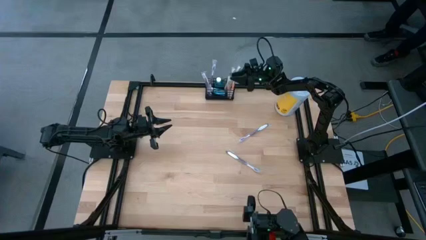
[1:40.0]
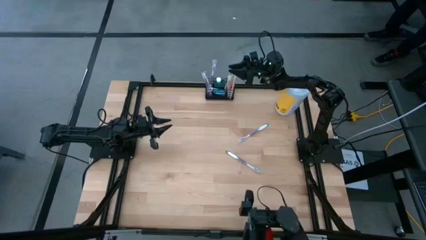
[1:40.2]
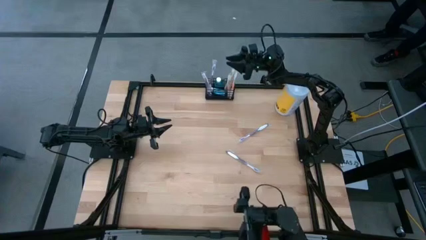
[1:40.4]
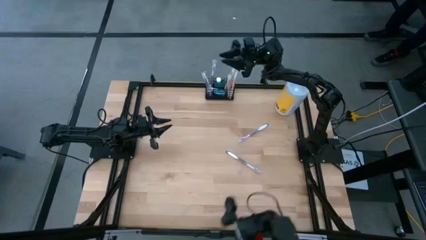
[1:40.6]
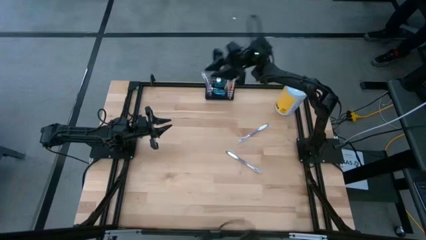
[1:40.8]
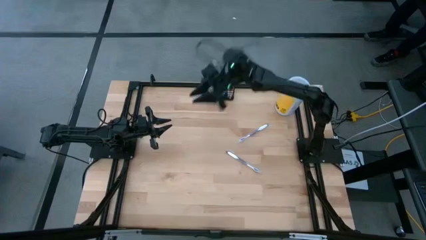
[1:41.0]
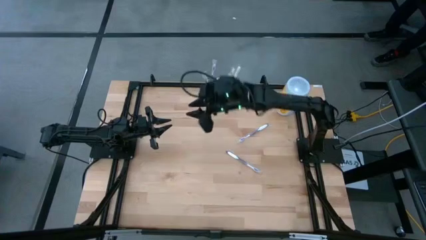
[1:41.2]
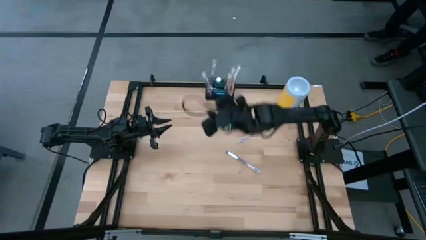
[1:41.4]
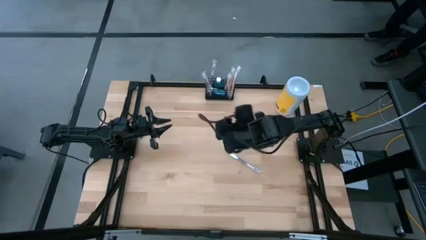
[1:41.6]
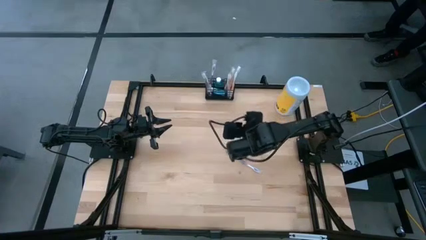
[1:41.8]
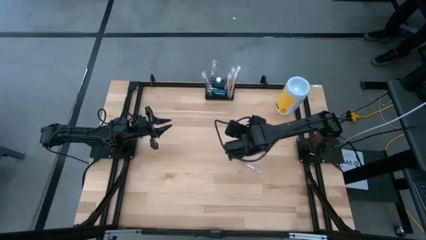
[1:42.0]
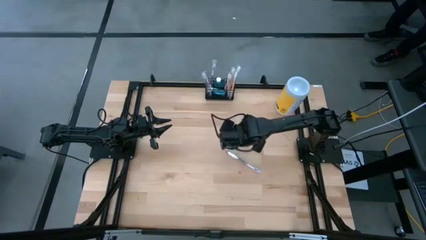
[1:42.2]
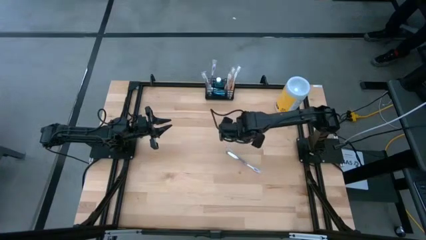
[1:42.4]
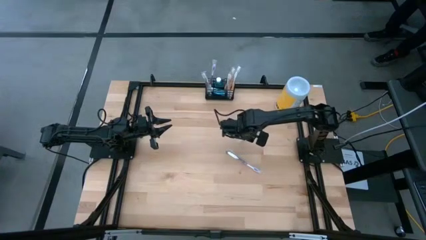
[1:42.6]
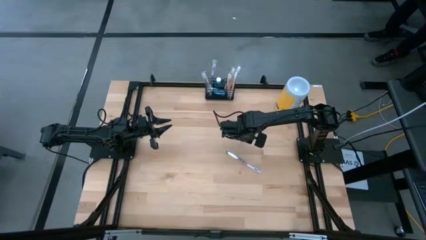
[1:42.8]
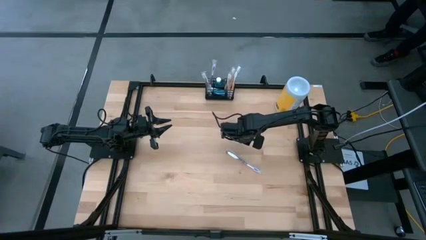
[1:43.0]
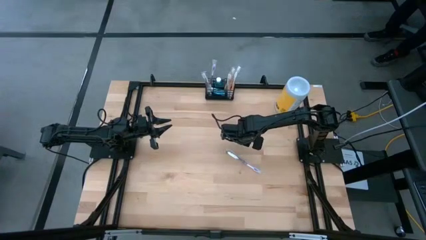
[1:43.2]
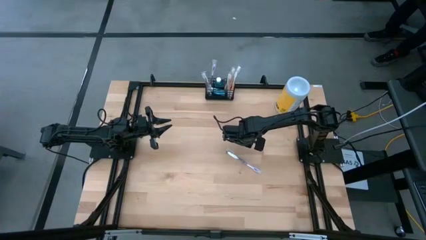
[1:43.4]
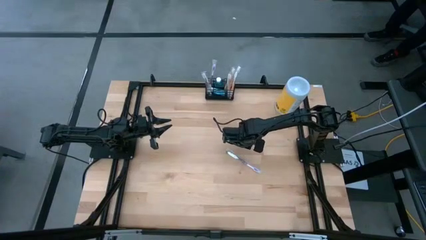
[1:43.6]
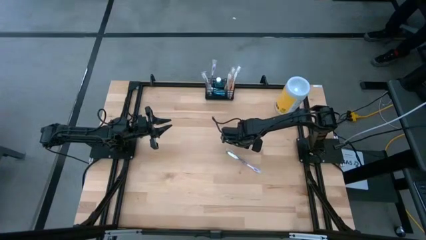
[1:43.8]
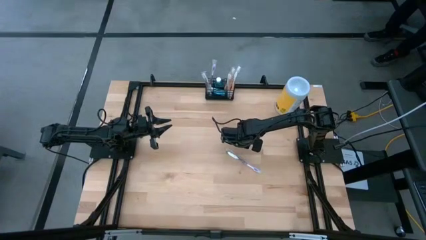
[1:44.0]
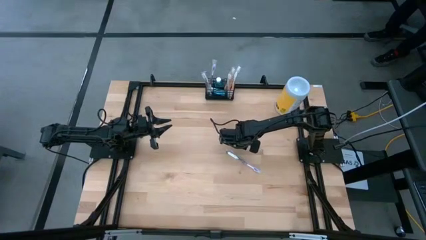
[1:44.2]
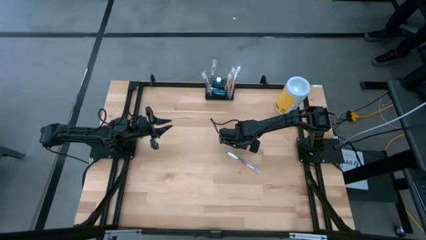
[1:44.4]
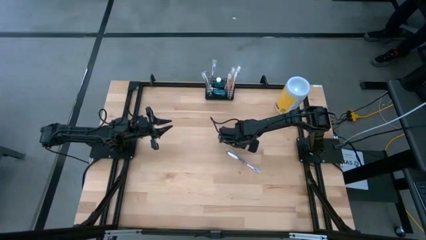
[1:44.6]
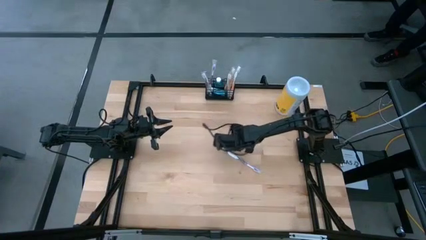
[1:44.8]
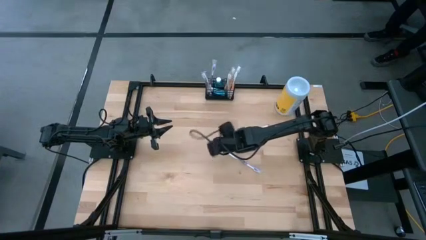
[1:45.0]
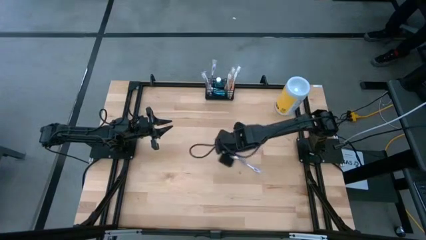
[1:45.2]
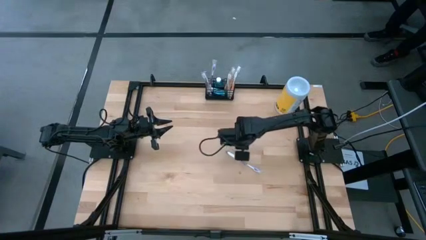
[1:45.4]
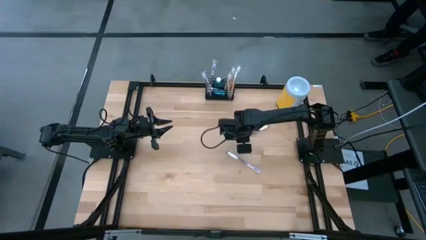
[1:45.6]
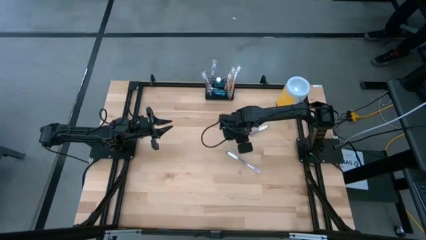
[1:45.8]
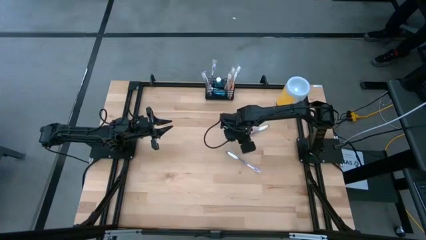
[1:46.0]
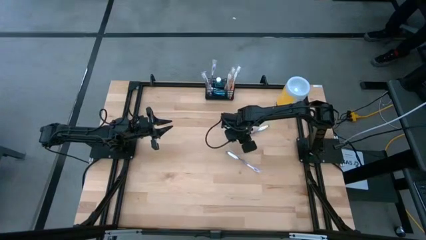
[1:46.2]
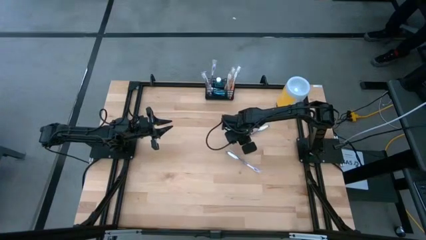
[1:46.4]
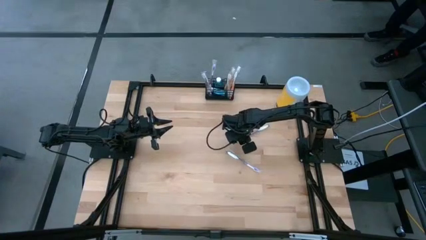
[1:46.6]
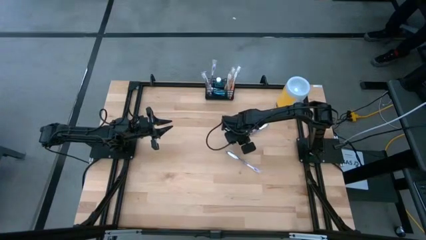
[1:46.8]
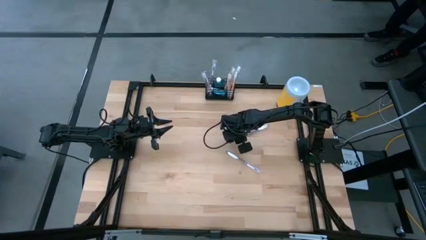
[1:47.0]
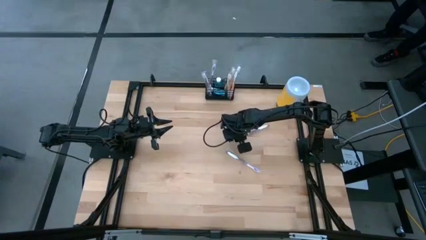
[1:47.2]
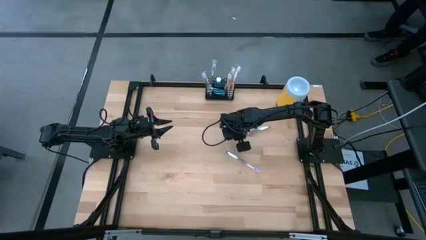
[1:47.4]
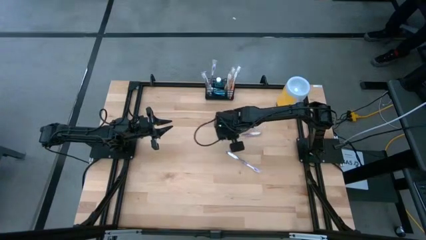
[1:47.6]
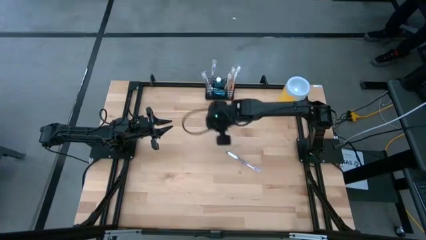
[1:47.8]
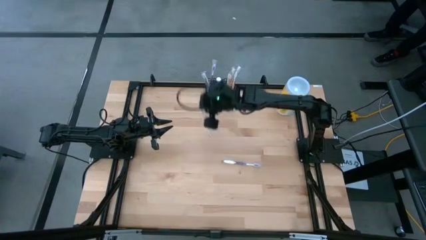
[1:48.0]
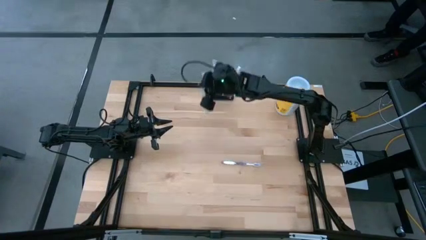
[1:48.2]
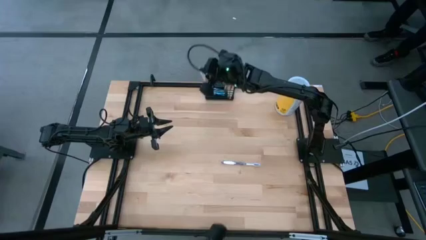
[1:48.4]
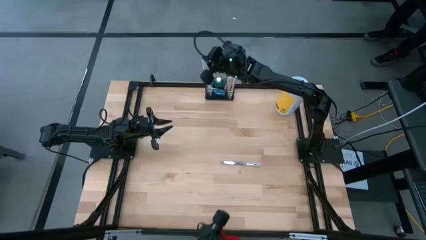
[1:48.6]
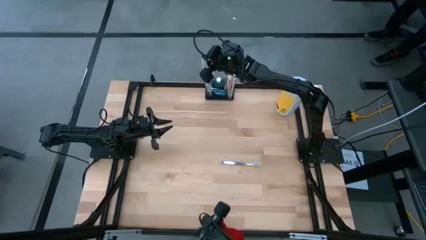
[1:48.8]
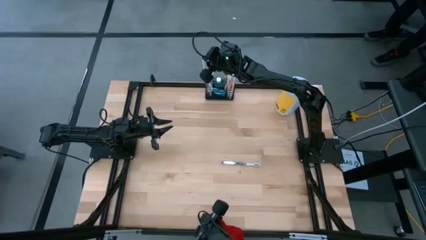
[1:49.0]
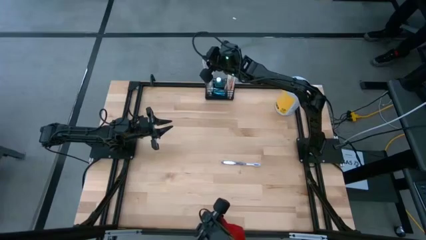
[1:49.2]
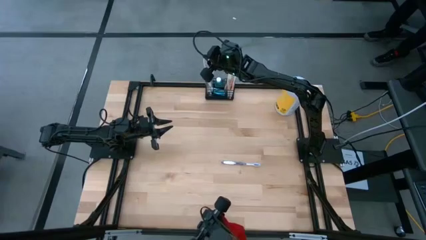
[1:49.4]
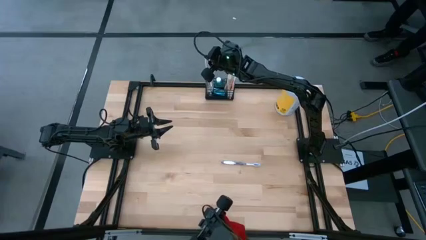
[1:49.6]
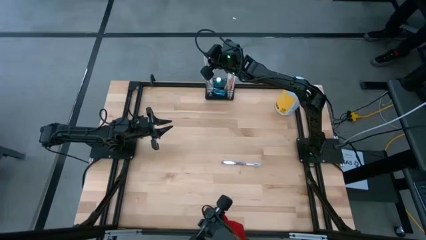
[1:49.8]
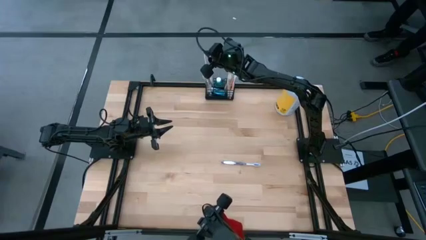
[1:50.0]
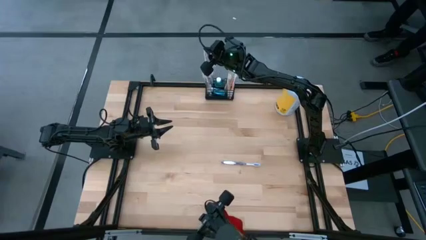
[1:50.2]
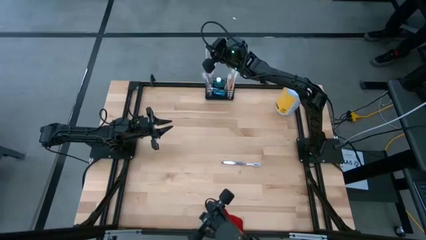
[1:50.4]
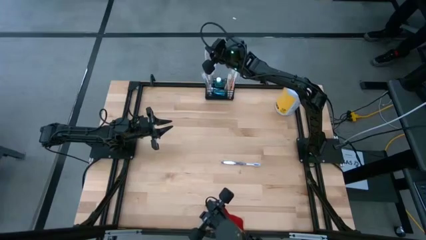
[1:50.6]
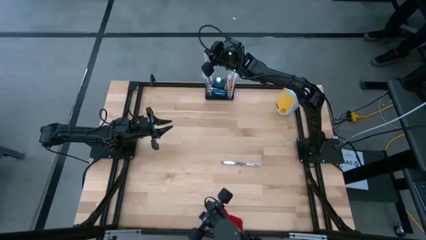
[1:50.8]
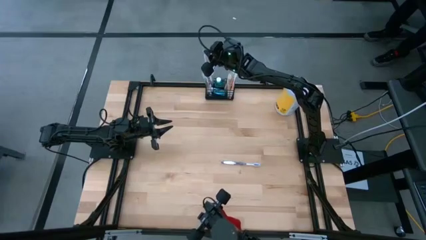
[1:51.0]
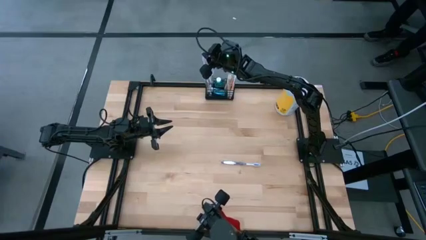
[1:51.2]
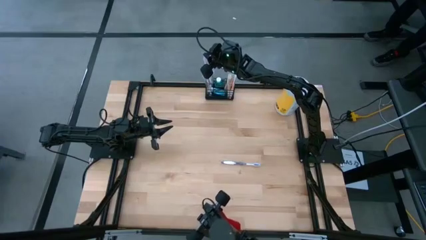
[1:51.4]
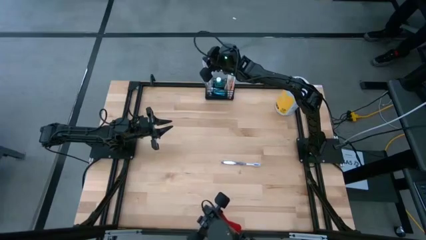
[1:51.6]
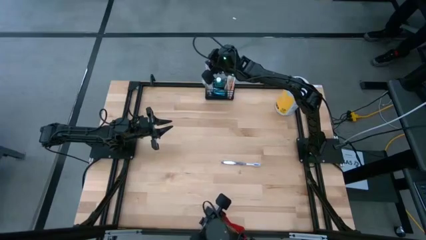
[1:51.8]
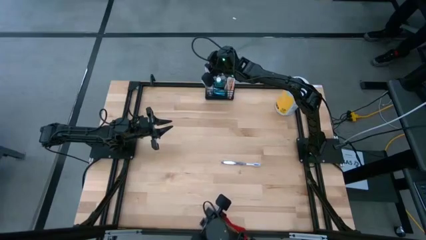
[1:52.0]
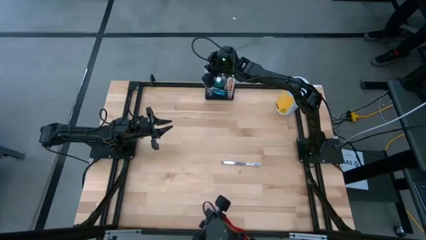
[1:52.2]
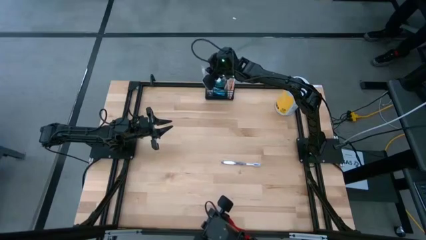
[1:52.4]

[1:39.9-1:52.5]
Task: Pick & Place toothbrushing station
Put the violet toothbrush into the black wire organizer bin
